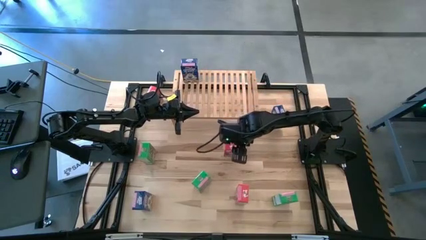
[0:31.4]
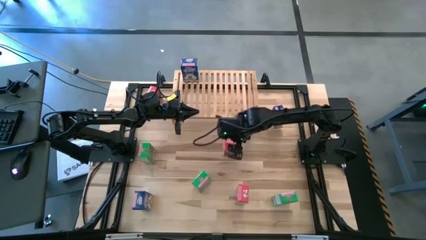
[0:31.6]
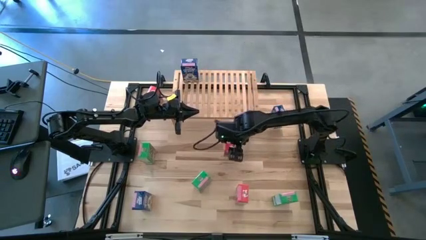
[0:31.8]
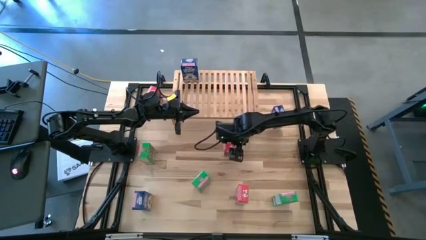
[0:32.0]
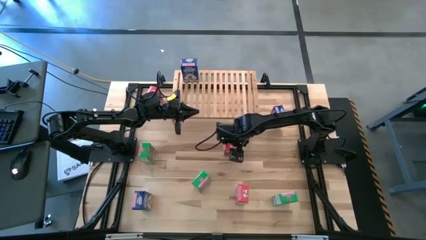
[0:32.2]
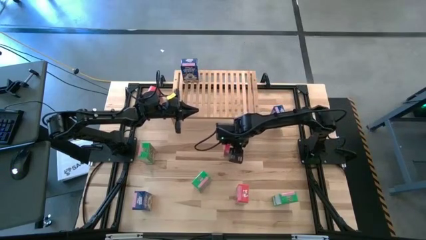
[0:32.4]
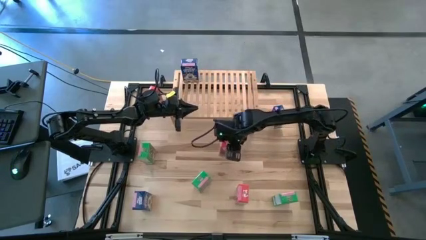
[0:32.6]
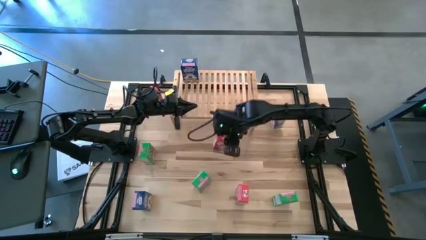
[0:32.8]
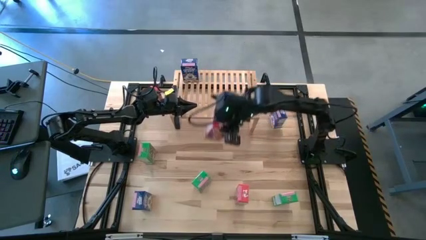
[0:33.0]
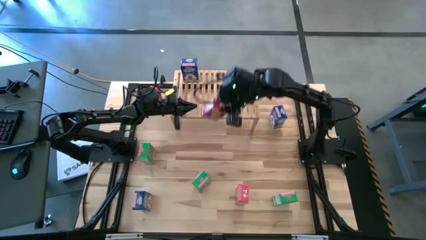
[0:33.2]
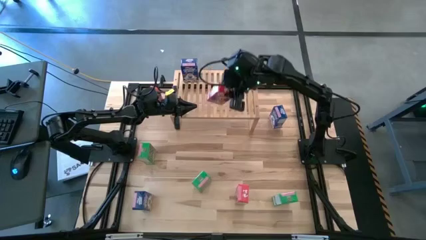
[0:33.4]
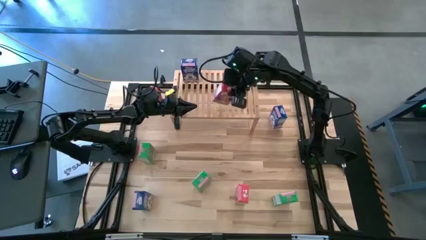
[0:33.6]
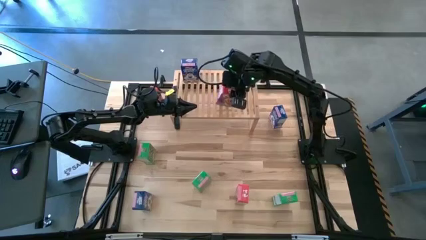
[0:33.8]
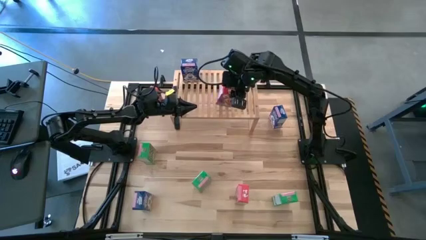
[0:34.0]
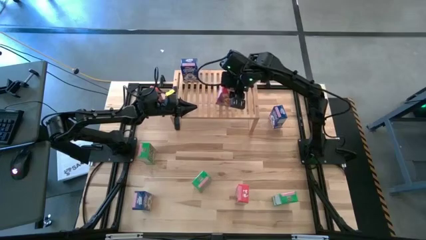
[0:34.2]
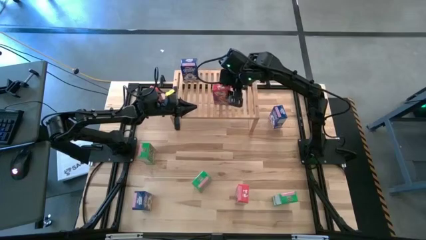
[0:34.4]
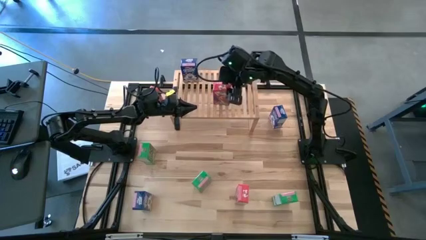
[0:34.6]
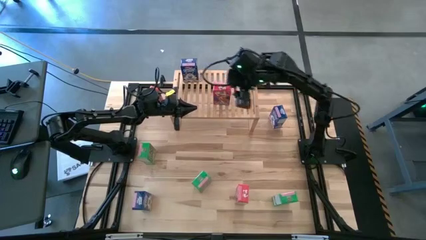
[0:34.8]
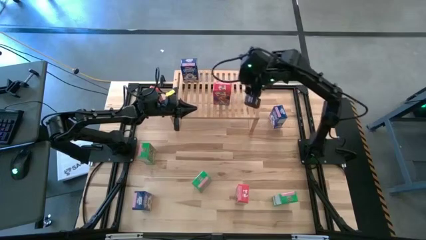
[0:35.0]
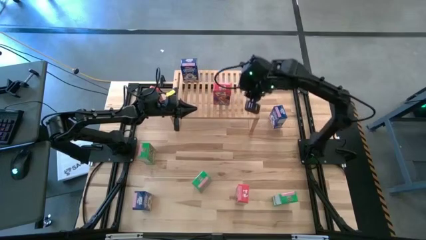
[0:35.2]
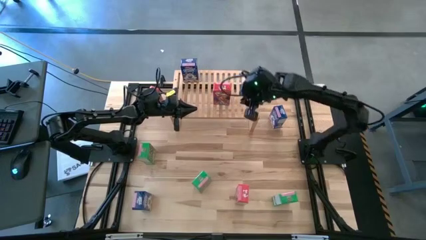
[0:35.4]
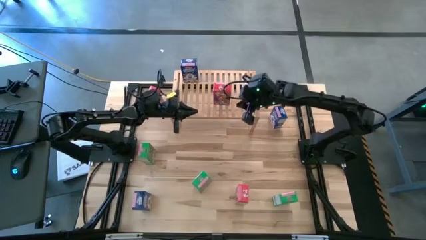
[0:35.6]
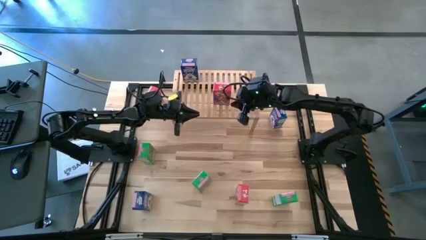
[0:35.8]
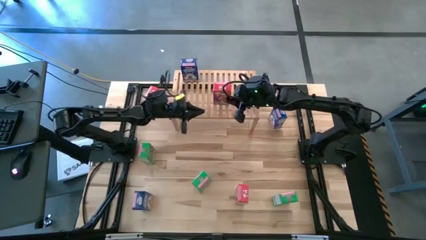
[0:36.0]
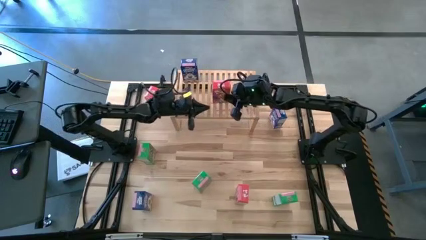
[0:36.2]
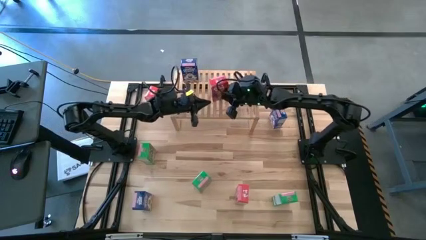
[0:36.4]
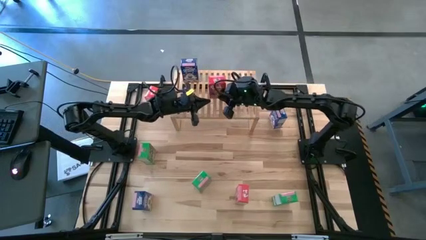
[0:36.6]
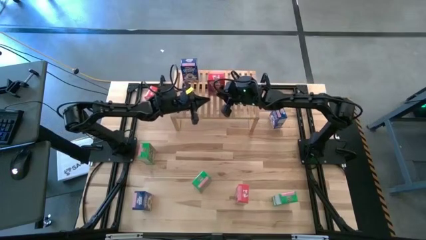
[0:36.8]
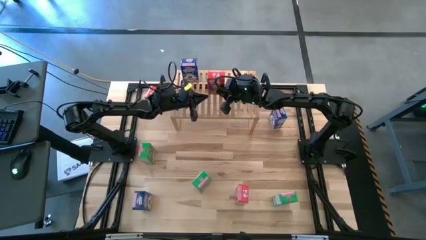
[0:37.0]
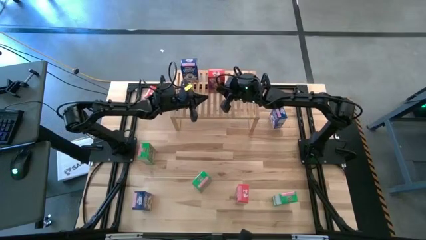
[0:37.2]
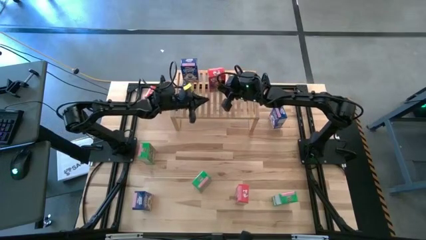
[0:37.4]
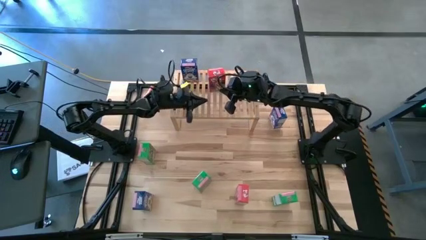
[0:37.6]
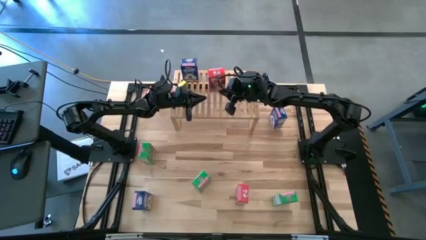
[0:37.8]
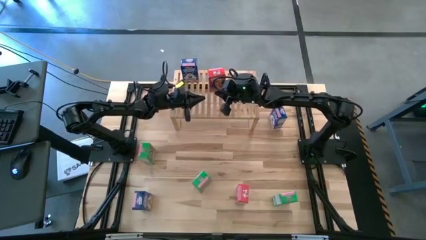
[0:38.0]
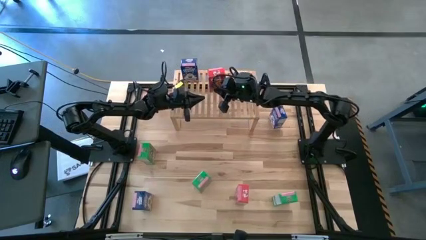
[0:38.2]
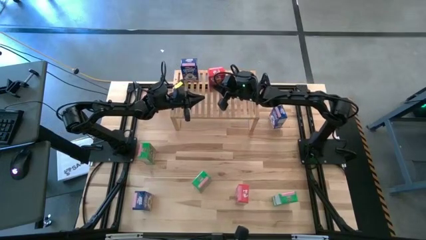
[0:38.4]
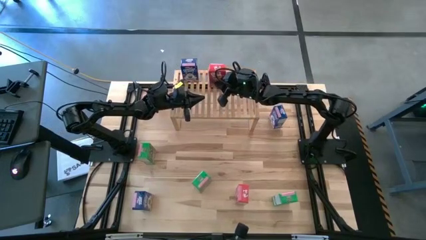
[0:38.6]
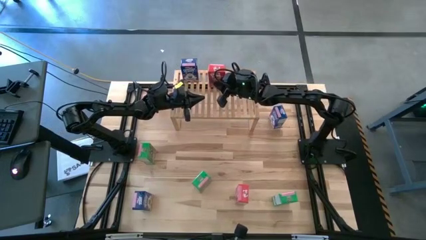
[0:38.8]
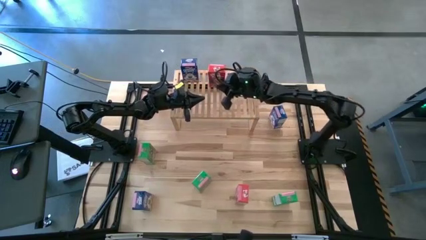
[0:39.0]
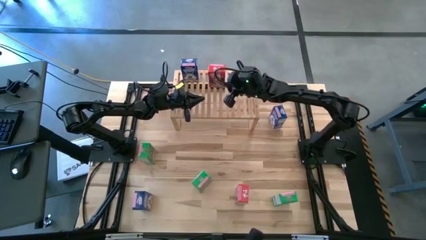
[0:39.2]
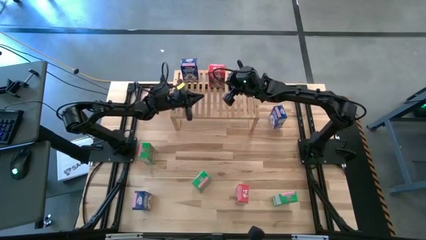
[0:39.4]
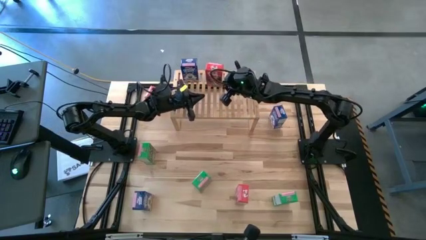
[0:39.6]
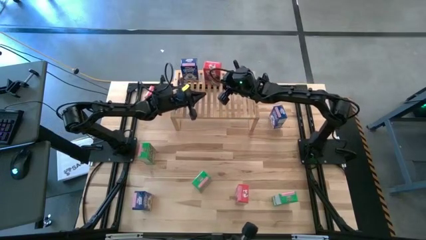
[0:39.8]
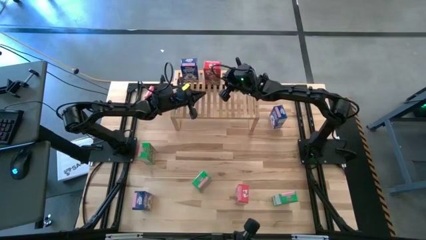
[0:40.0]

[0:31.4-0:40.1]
Task: Stack cereal on shelf
Put the middle red cereal box on the shelf

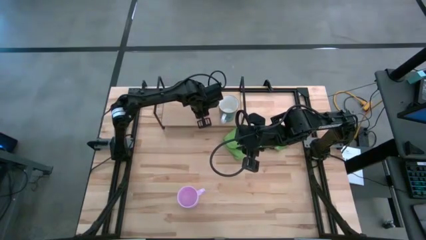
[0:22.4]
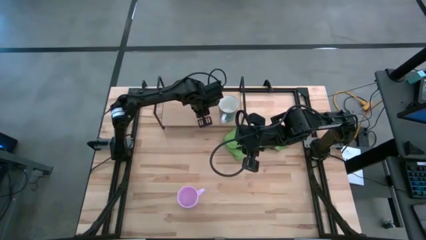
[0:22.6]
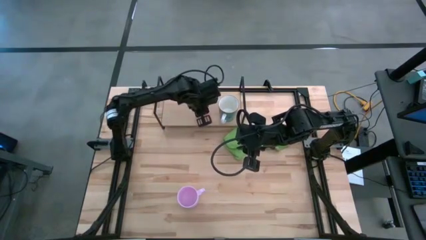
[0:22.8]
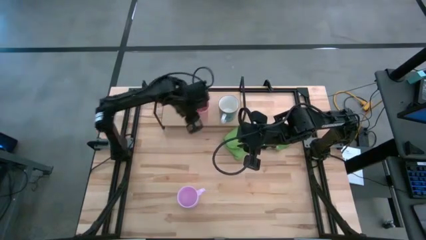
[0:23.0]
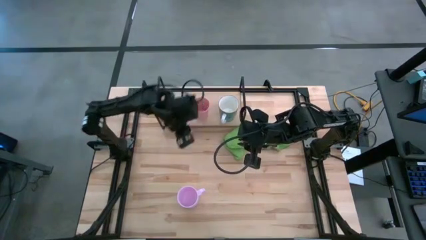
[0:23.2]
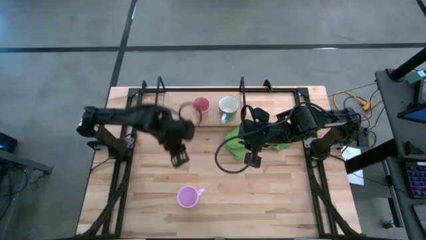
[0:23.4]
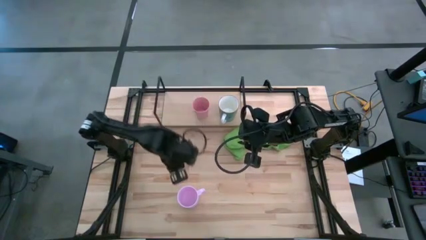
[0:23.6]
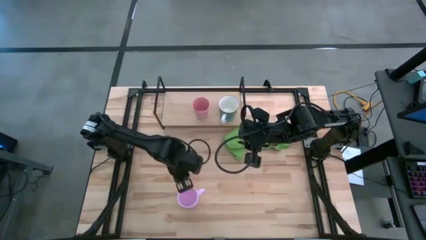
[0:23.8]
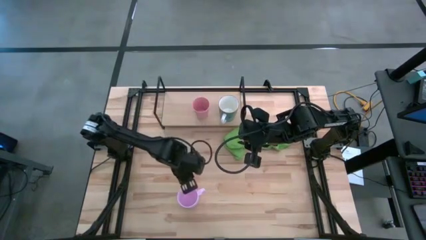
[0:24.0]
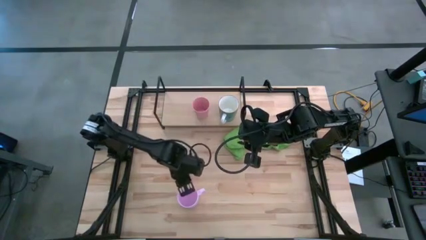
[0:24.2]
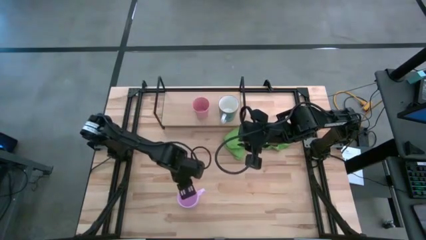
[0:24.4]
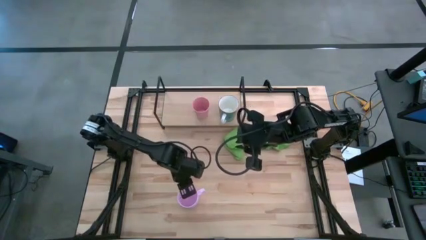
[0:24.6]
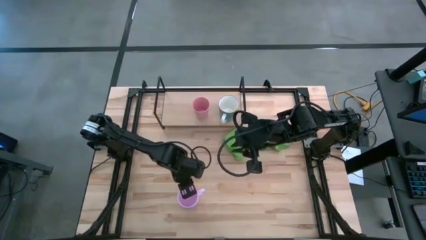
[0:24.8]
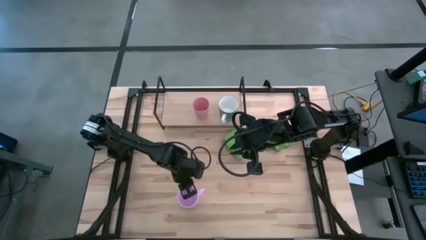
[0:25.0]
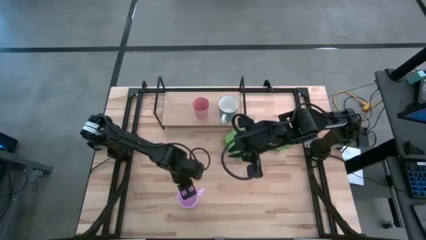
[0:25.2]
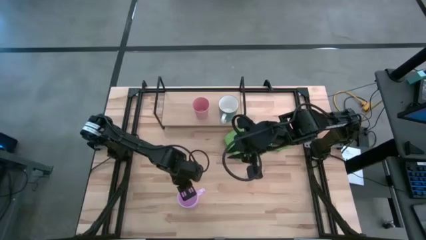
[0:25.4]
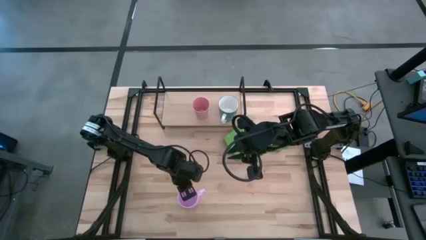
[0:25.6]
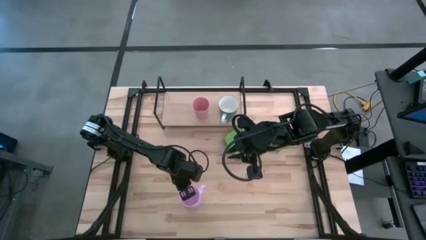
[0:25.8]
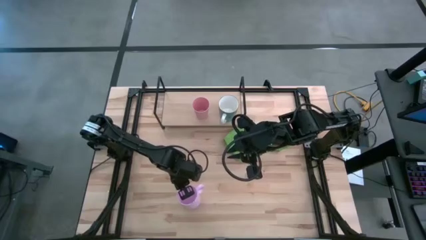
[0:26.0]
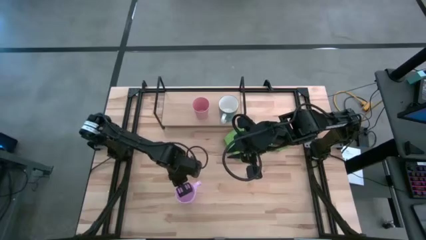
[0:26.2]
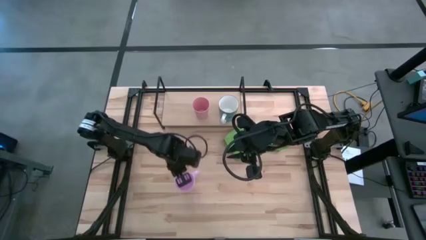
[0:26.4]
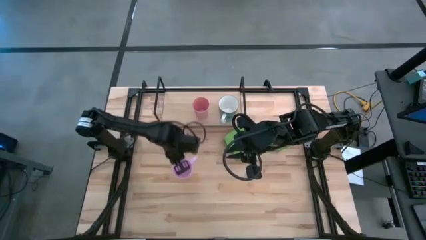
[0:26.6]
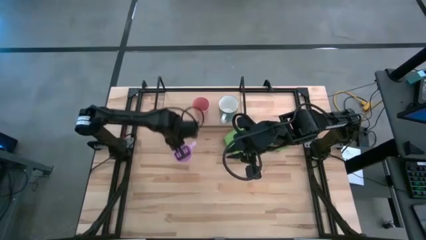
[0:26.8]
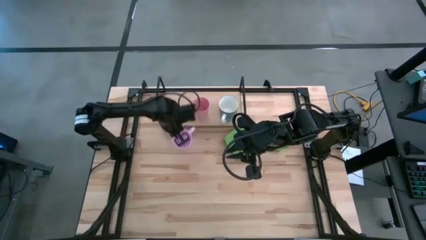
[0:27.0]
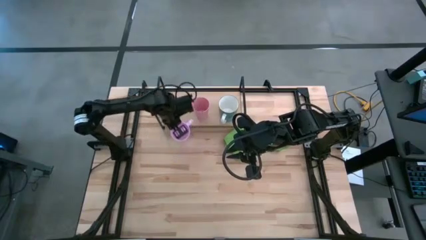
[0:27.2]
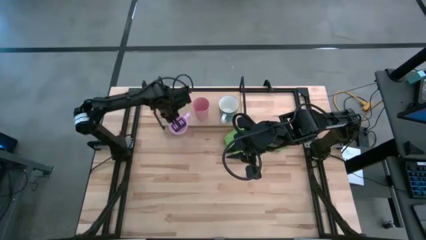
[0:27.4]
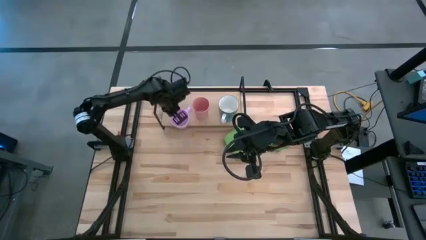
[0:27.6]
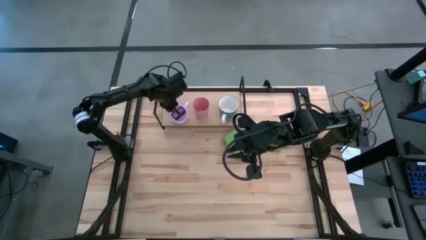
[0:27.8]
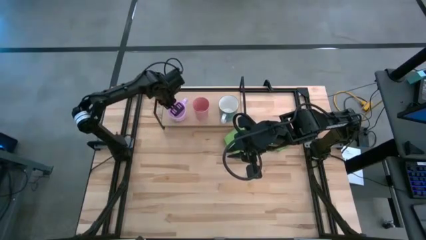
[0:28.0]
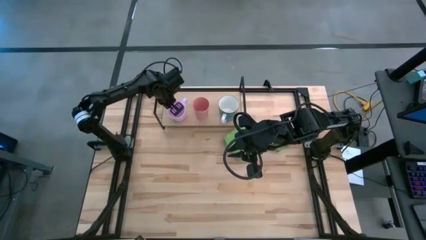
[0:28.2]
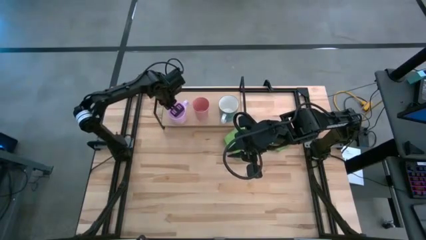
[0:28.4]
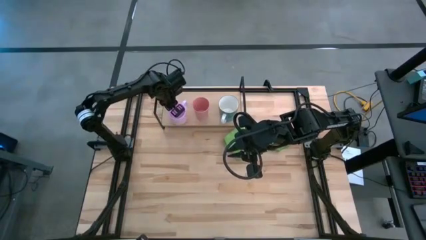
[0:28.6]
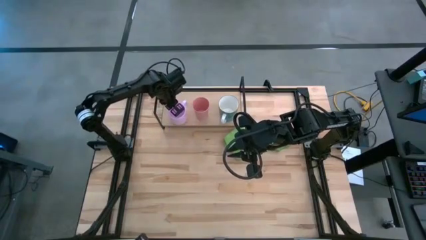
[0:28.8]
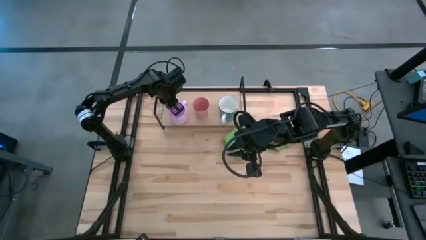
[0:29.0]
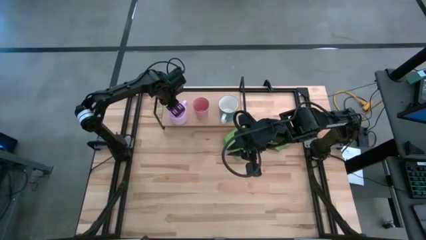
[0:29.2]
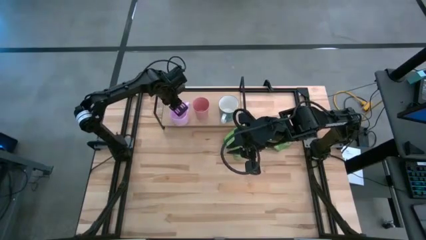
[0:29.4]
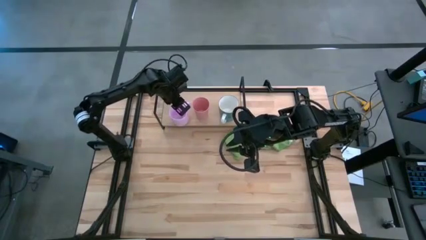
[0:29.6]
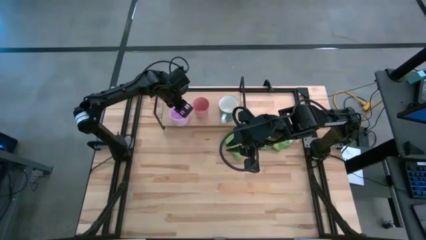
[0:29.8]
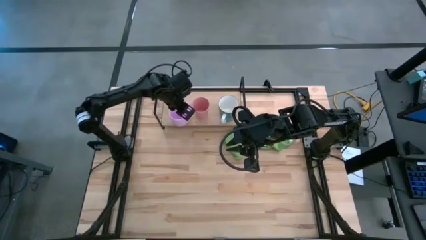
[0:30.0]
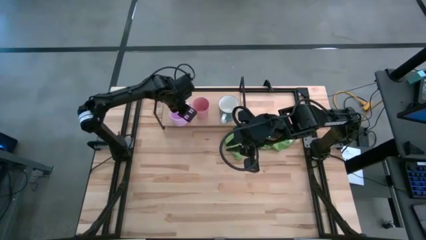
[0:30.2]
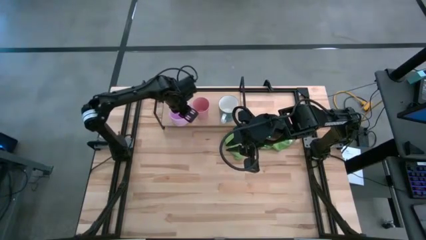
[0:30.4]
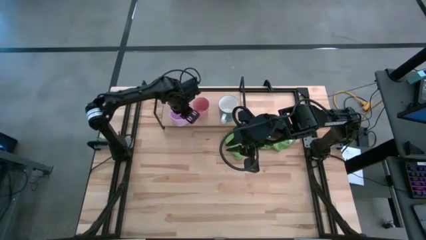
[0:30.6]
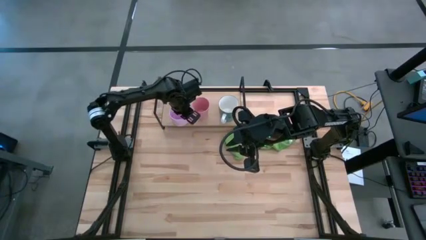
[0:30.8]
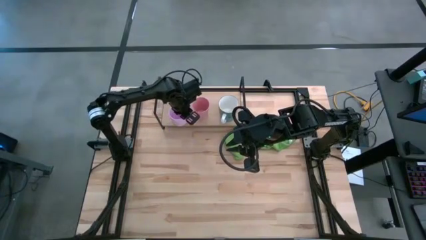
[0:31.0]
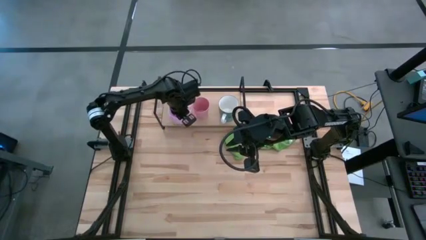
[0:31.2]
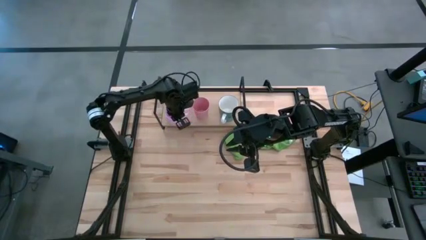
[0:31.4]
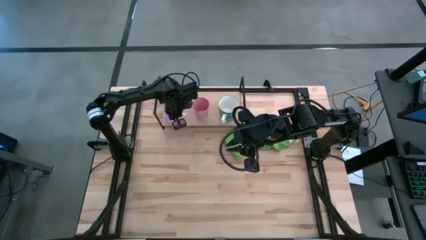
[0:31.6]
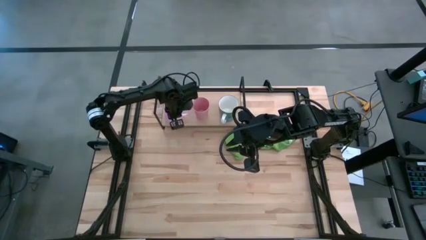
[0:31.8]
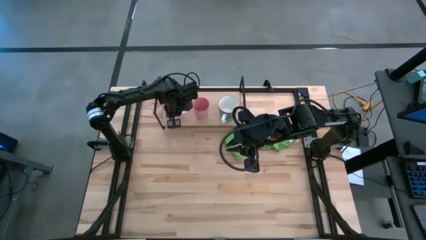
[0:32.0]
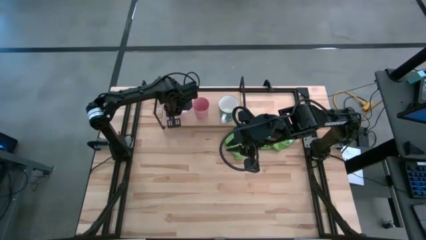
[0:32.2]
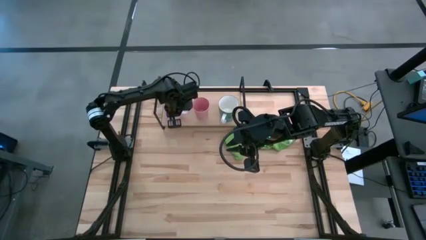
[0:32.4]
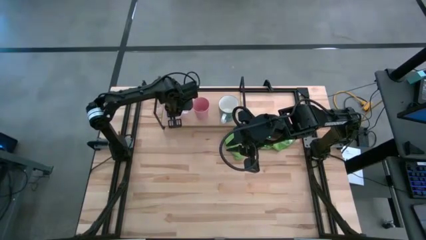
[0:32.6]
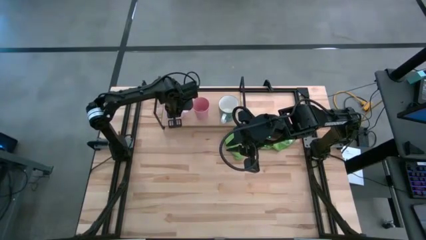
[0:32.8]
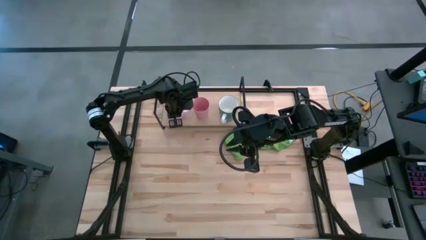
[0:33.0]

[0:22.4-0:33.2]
Task: Stack small to large cups/mugs on shelf
Put the violet mug on the shelf
